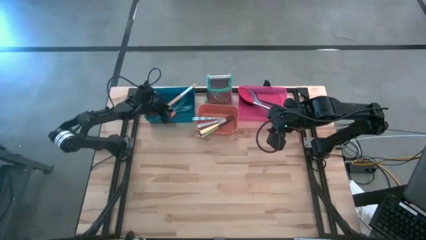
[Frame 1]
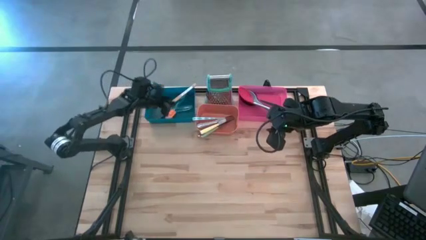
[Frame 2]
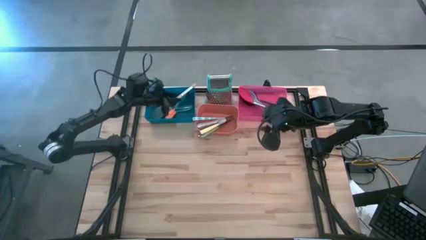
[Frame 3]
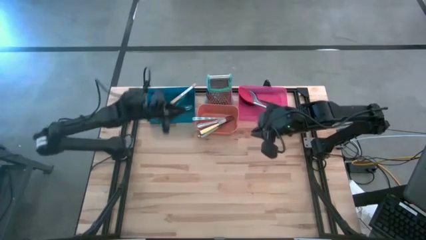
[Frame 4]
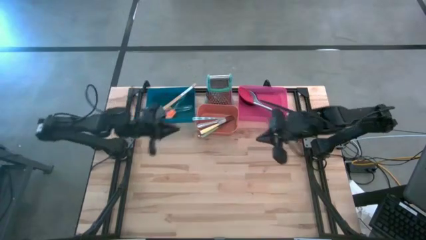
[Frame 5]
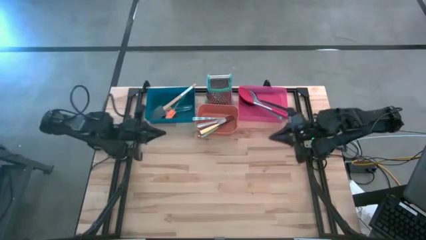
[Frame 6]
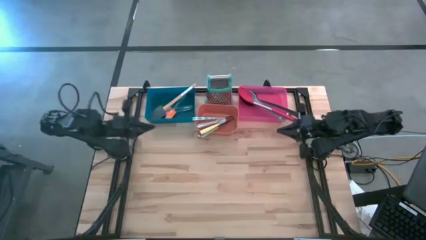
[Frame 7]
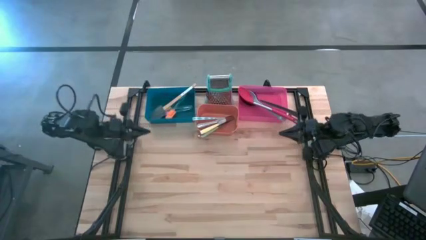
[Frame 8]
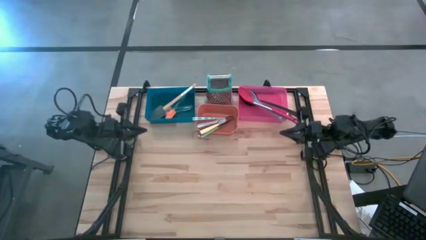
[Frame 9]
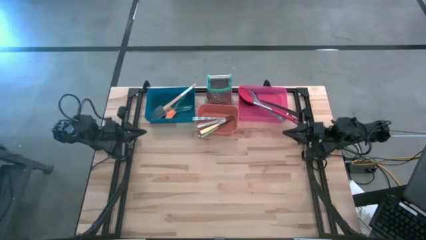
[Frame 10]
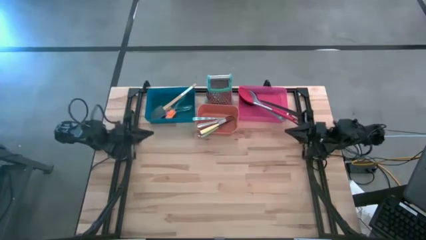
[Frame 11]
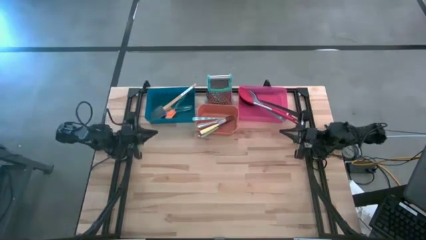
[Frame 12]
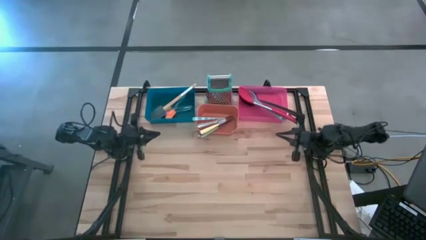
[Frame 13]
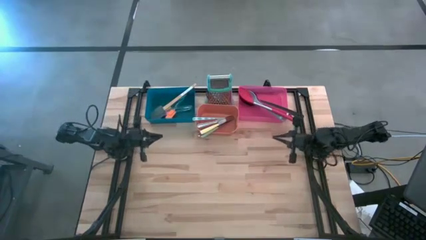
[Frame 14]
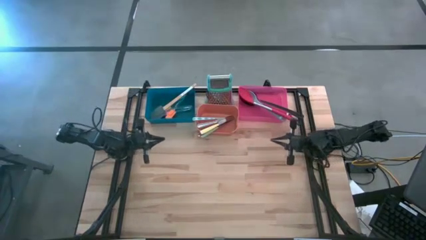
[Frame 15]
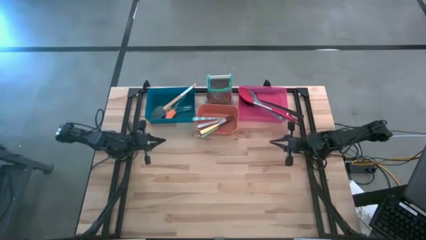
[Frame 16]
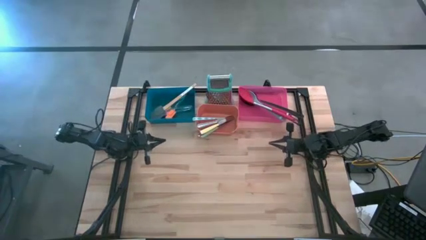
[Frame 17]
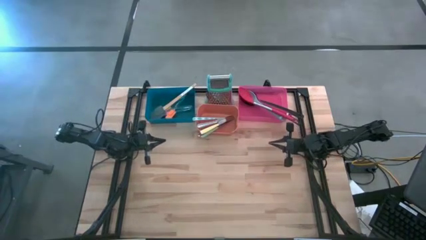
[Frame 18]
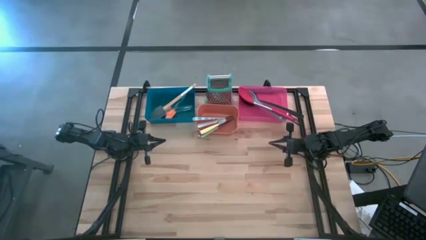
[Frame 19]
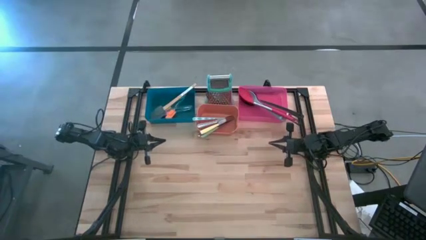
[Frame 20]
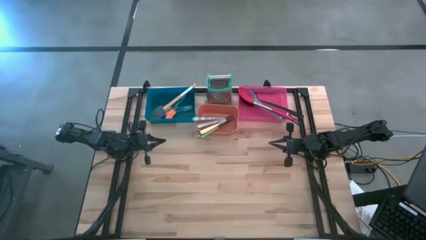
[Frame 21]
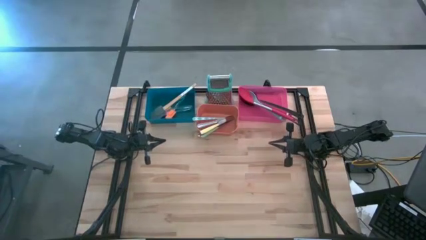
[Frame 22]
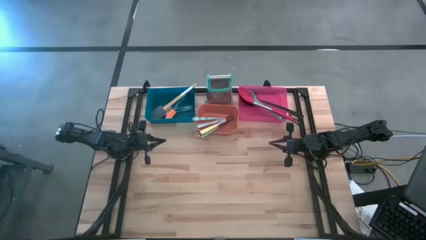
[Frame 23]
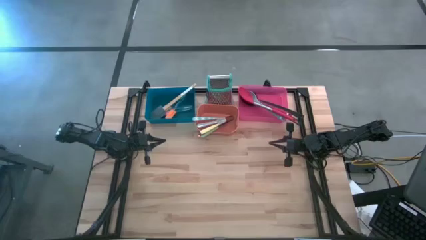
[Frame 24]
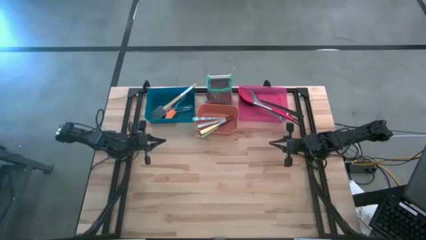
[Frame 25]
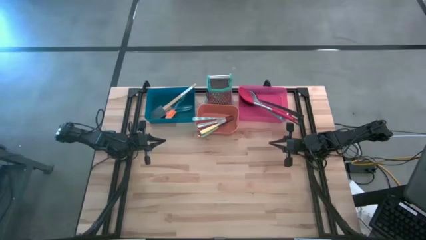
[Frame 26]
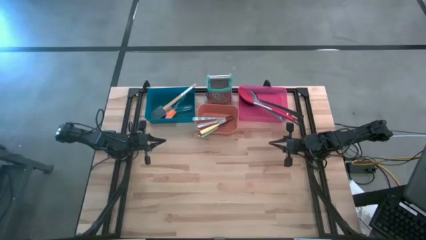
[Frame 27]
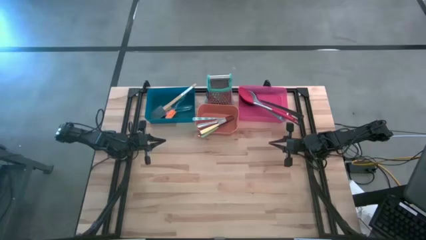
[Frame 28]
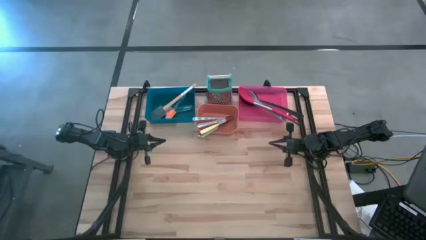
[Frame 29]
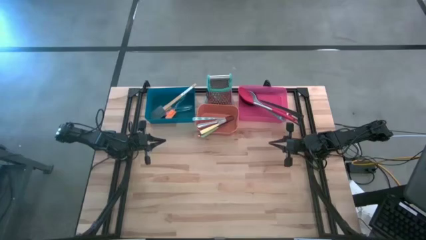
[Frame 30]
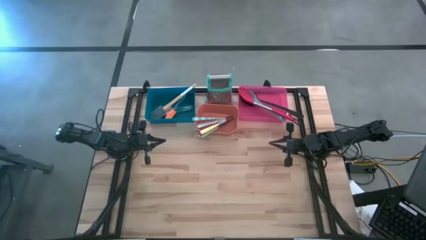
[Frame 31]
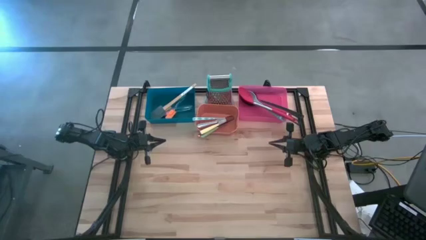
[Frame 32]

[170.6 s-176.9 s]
Task: Pick & Place Kitchen Items
Return to Home Position

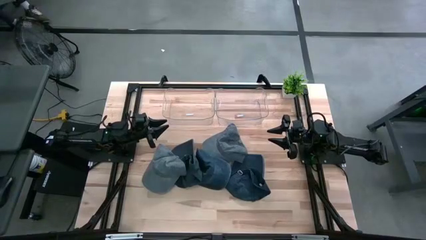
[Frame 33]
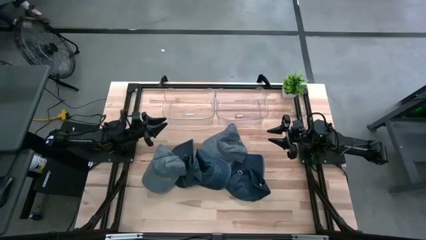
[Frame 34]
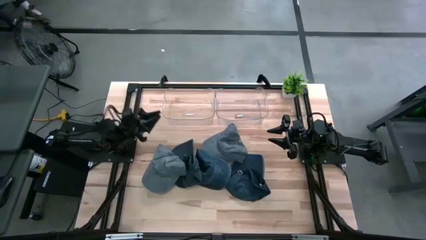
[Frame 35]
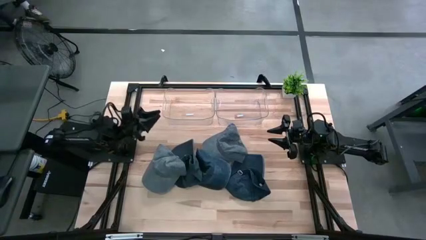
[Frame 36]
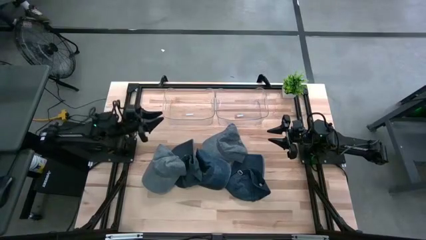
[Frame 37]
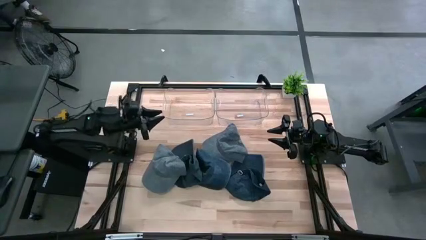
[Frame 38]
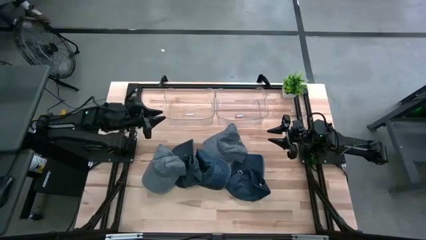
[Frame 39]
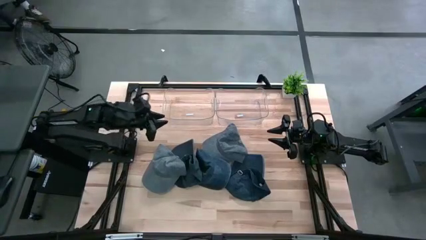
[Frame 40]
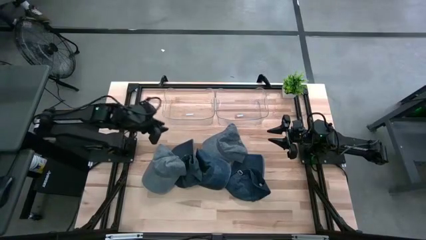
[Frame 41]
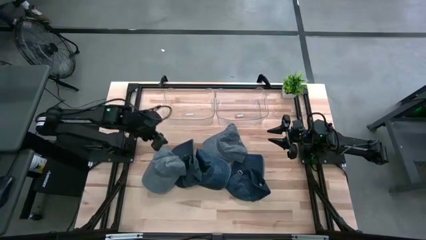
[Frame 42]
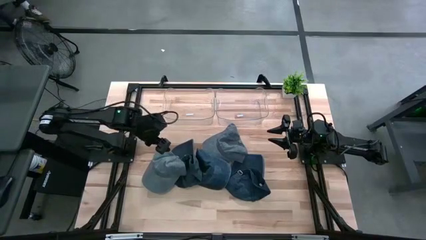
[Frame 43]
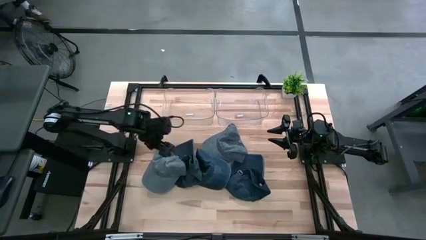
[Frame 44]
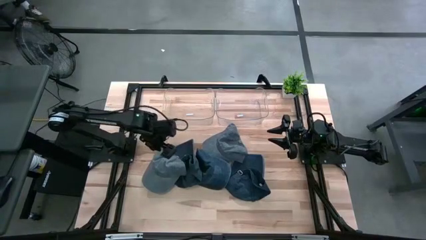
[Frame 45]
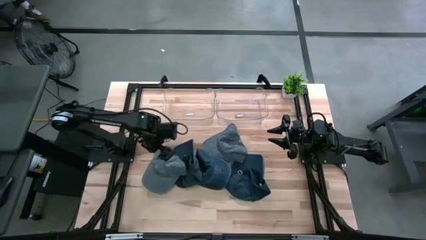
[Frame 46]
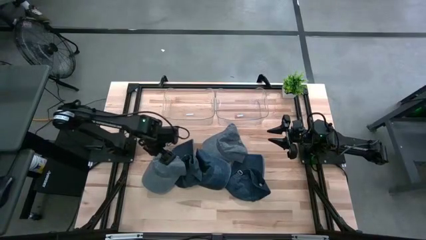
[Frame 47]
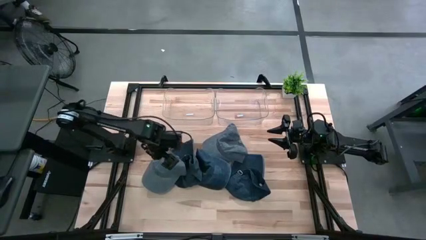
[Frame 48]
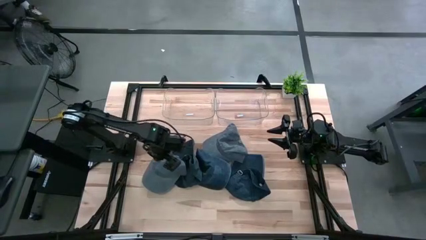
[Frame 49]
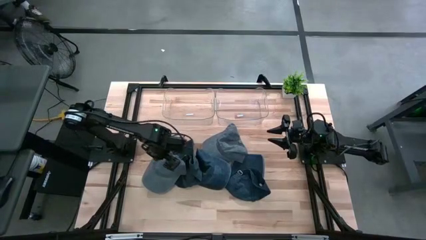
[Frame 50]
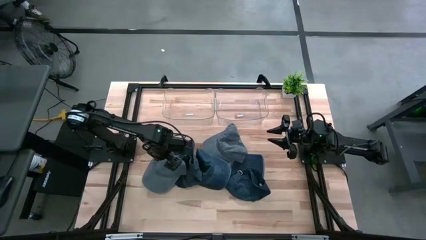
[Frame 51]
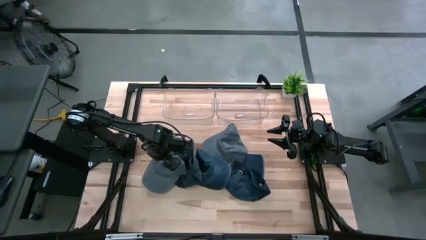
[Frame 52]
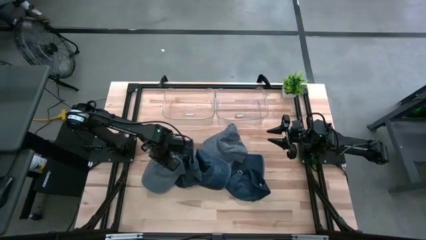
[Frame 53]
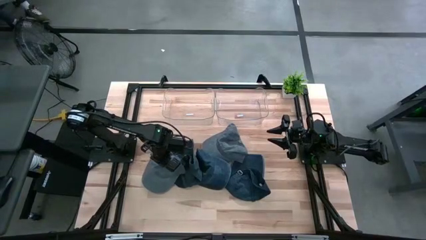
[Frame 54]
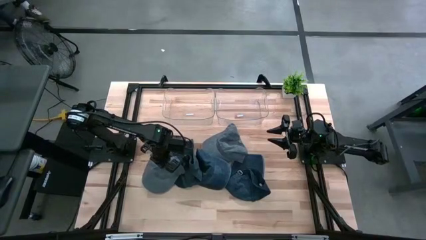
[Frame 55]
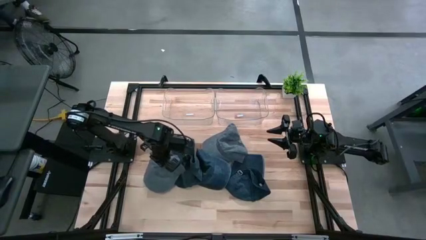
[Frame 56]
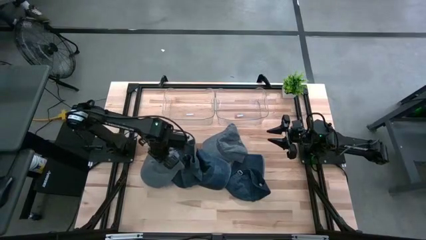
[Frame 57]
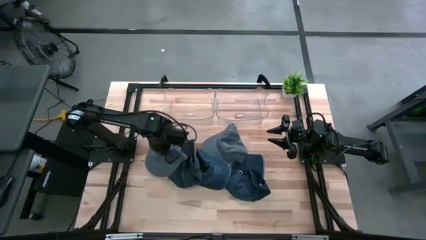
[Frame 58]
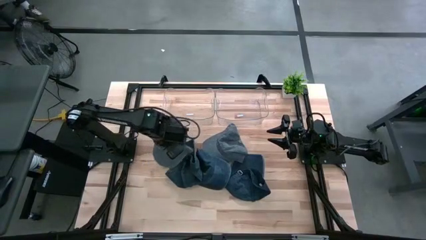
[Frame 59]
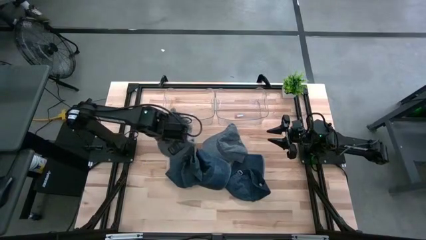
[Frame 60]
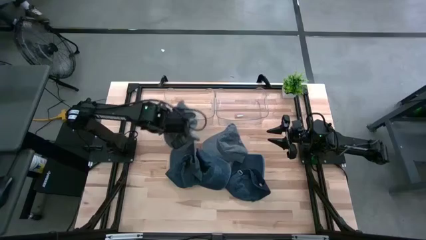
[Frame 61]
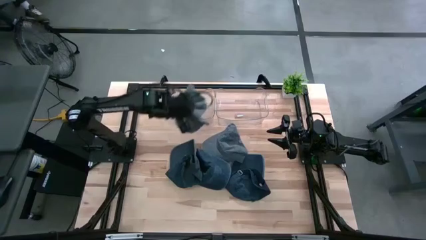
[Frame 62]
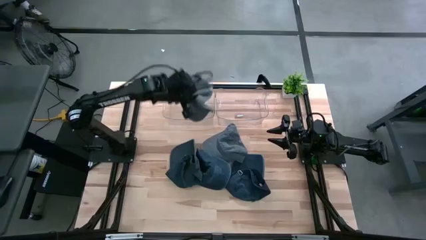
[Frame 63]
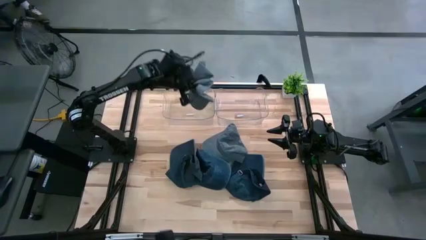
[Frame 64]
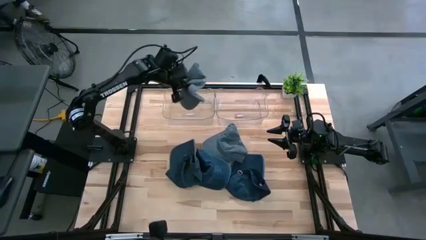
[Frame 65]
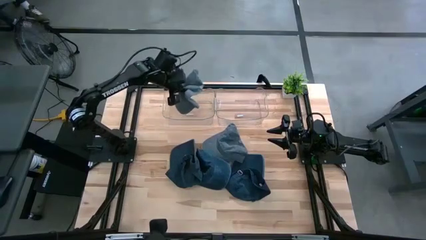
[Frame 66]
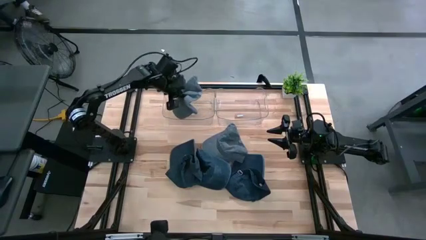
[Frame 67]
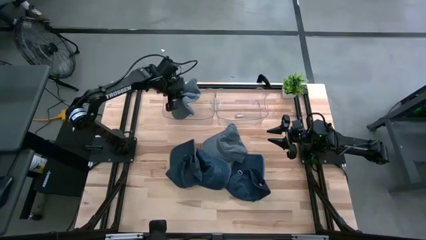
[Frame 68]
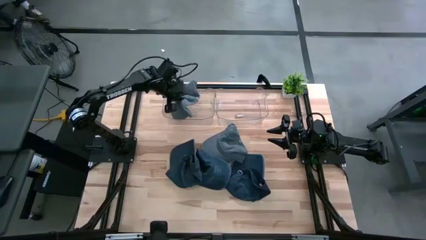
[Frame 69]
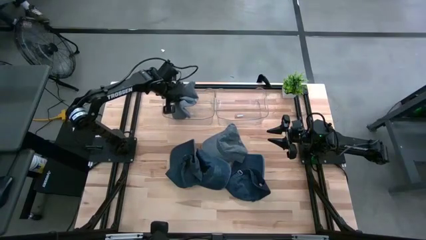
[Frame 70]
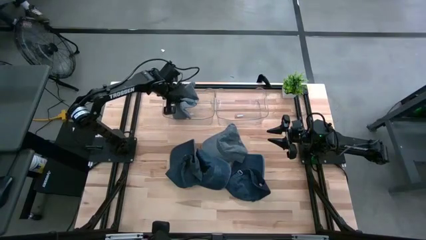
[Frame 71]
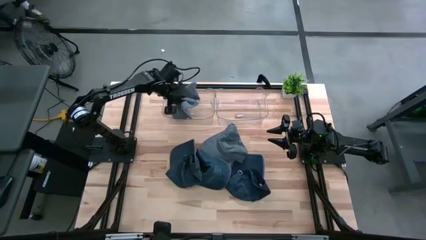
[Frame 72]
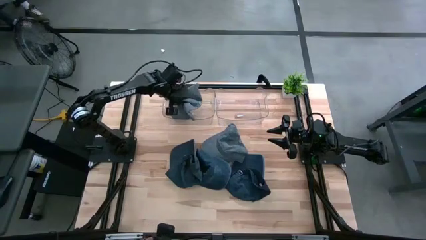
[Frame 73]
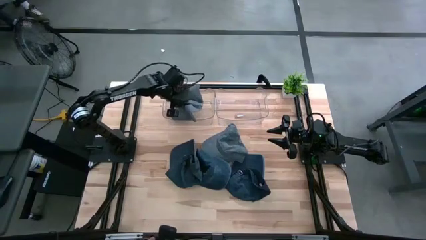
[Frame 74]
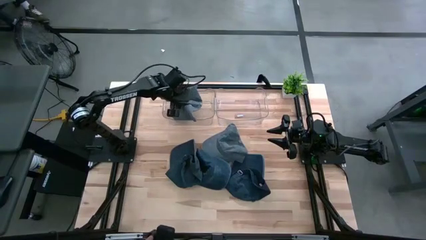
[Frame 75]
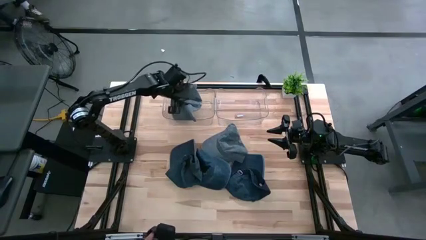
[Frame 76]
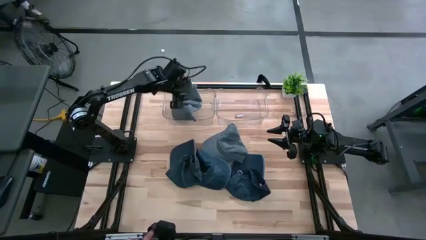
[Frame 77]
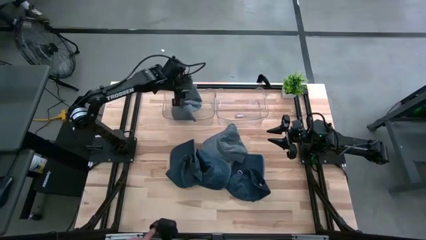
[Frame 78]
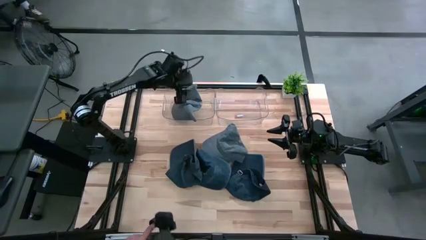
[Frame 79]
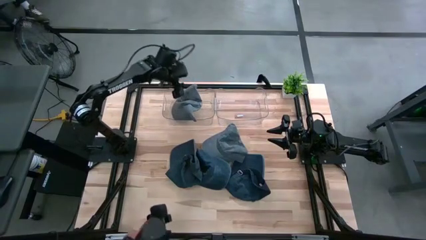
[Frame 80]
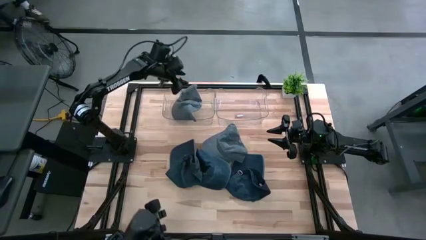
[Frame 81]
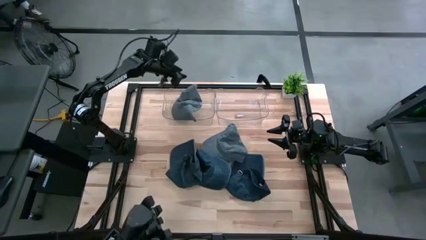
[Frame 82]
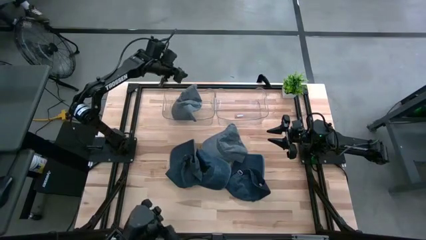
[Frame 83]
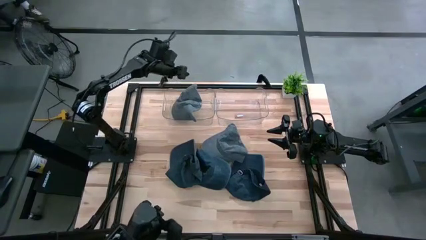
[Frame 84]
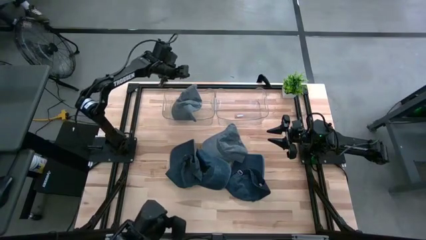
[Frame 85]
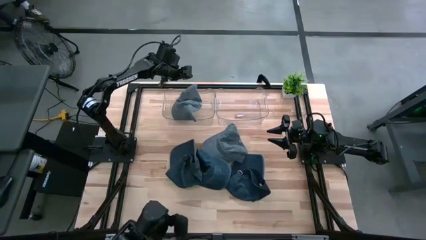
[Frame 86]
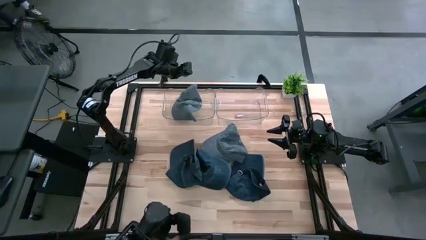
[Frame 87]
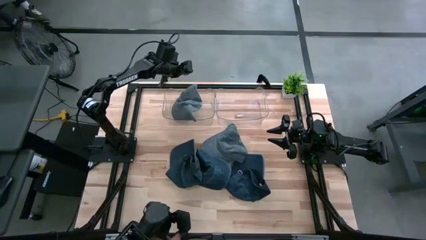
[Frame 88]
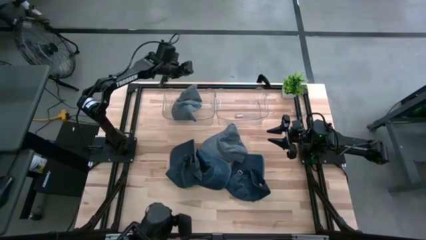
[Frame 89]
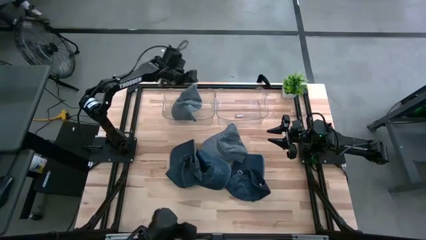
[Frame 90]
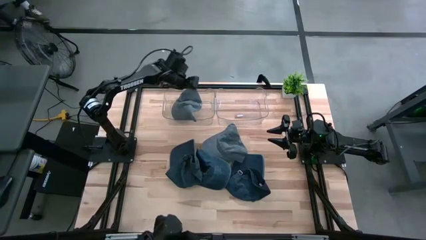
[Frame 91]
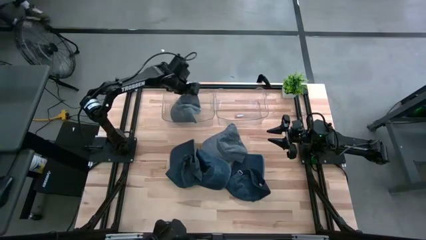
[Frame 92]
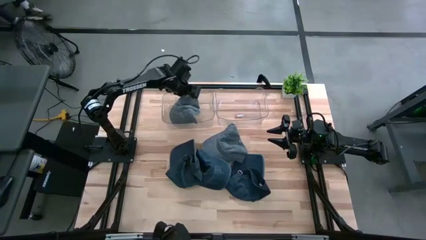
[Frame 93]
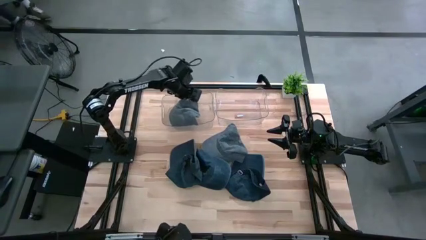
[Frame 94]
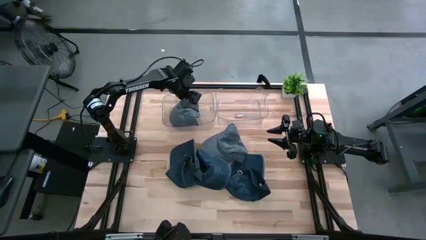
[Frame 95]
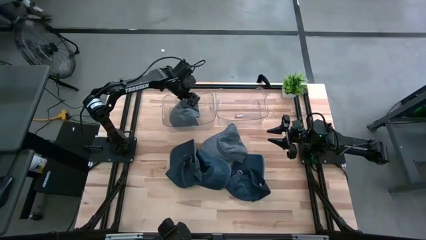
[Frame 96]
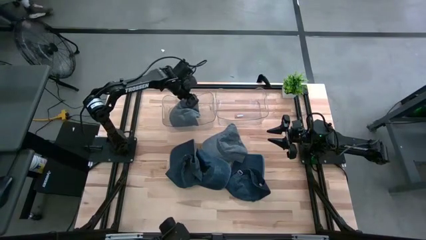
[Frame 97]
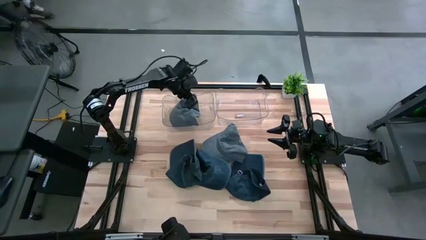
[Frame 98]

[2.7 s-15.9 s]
Task: Pick & Place hat
Put the left gray cap into the left transparent bin
